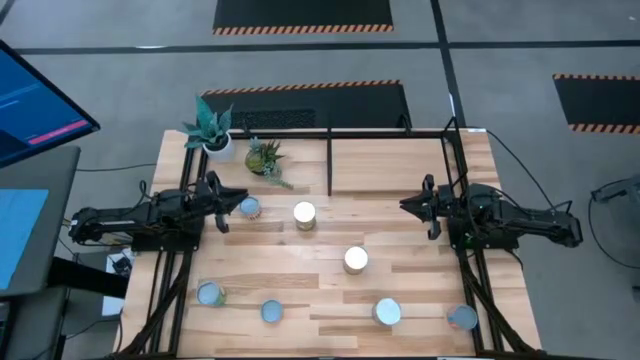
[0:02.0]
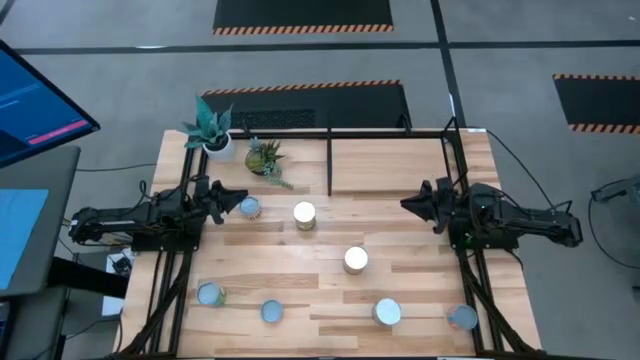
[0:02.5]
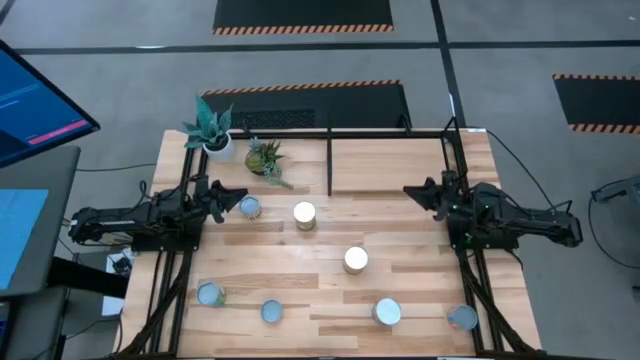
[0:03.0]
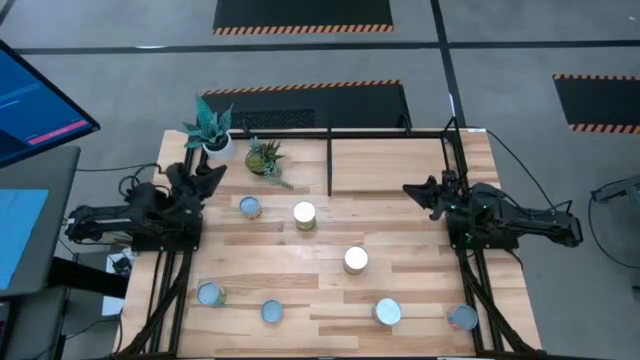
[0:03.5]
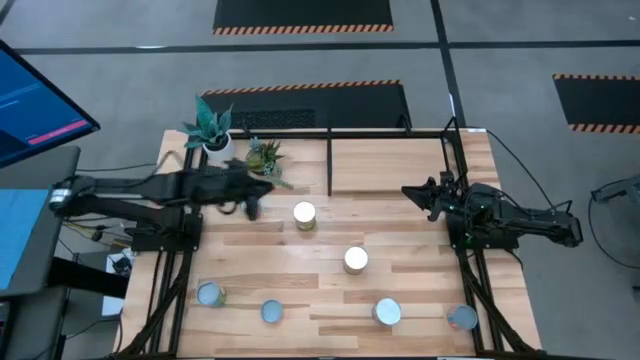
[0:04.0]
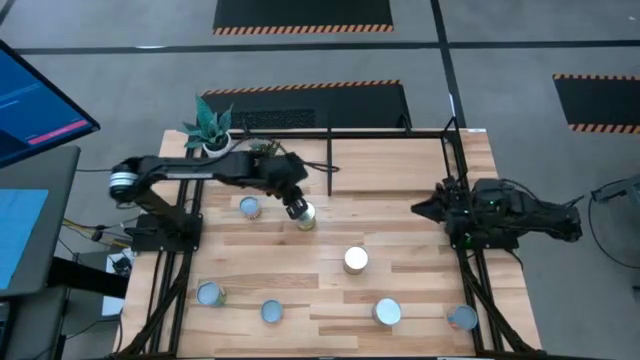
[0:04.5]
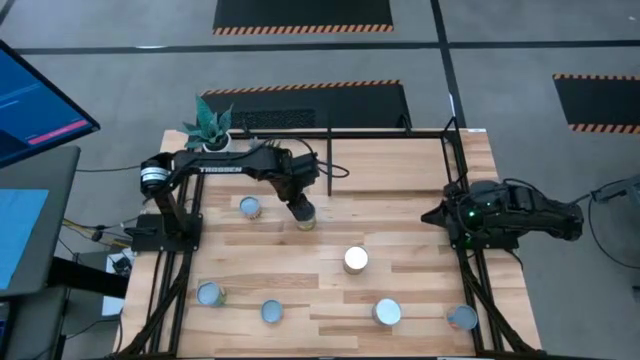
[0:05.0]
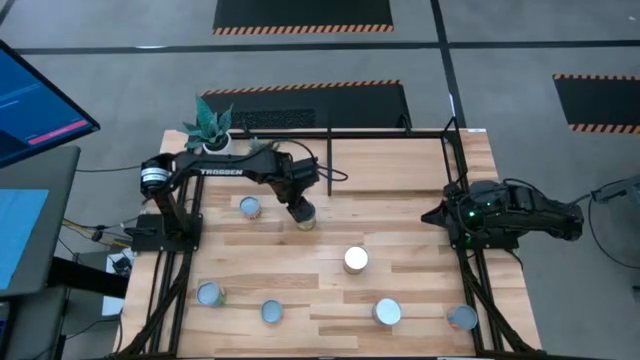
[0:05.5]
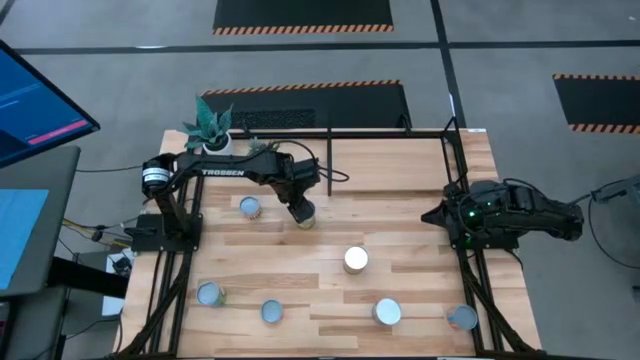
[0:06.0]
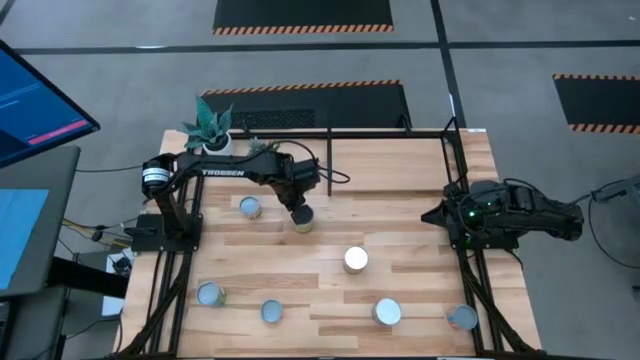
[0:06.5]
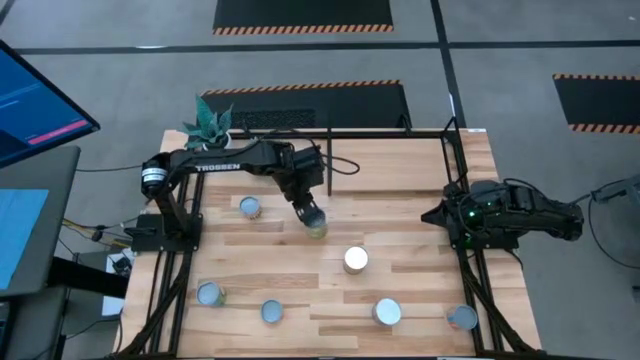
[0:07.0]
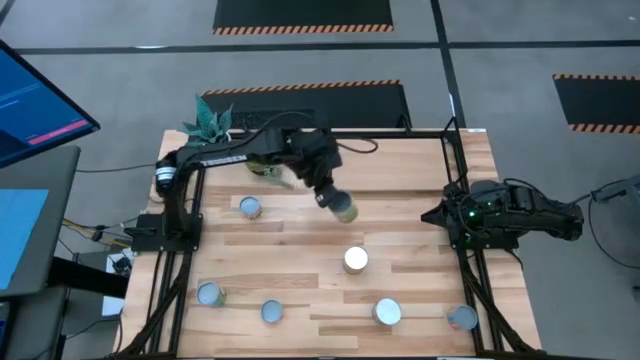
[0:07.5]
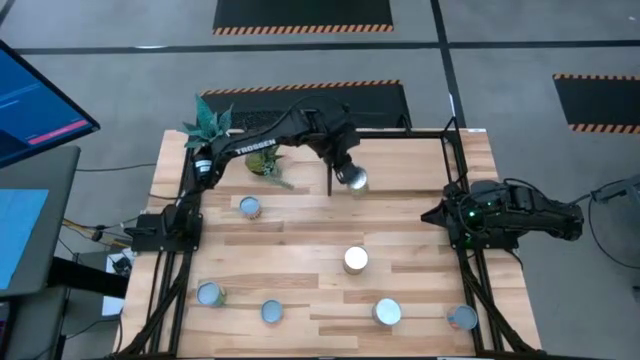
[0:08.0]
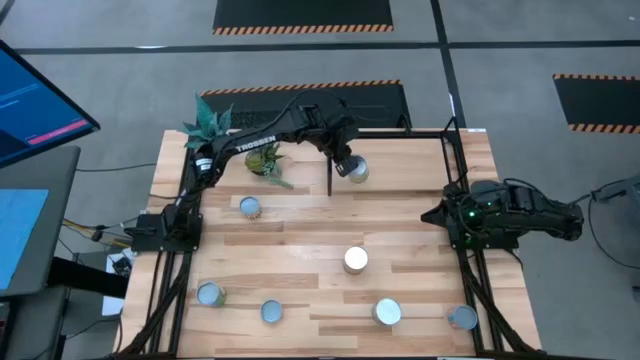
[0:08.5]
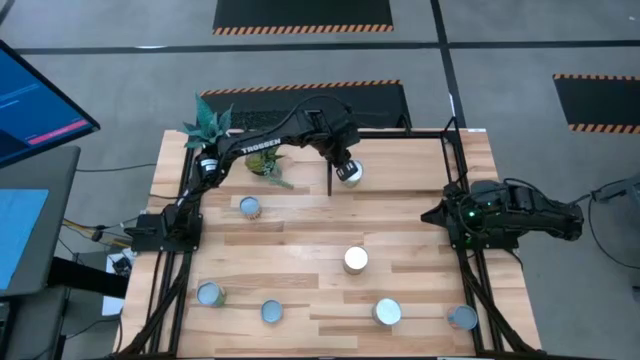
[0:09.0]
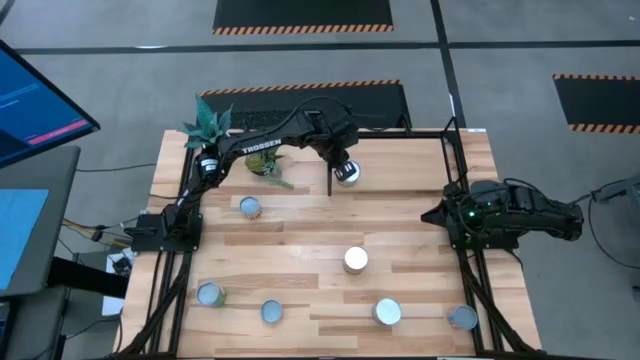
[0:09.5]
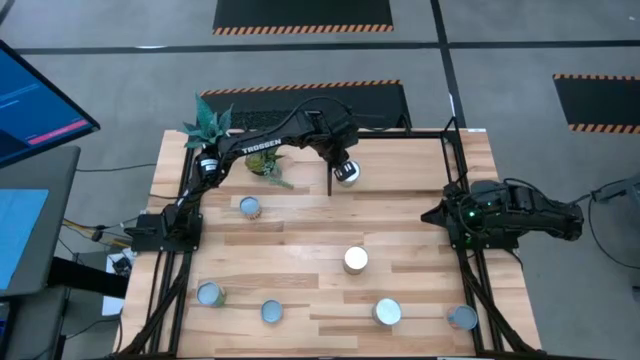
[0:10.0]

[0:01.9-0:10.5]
Task: Pick and place cans onto a shelf
Put the canned pears on the shelf

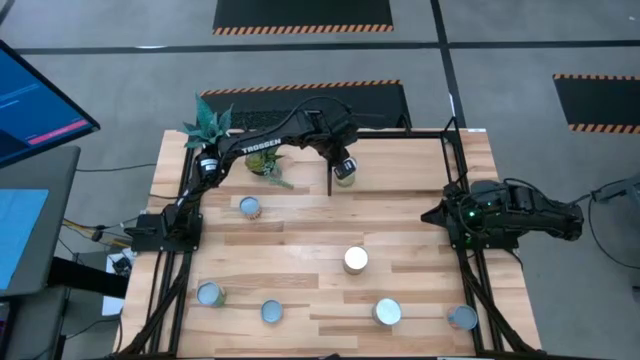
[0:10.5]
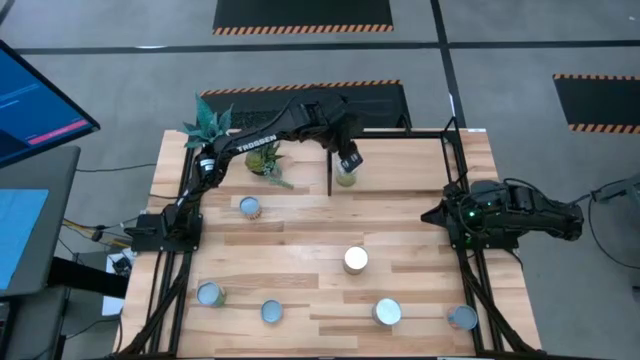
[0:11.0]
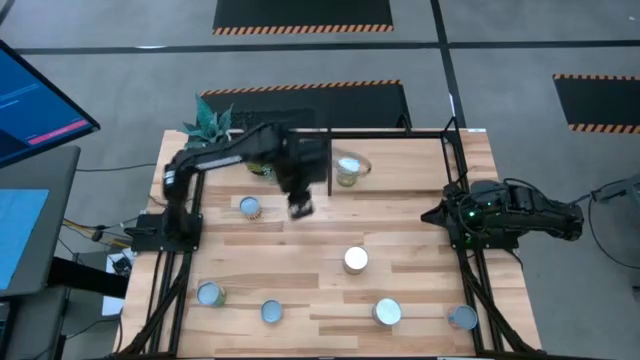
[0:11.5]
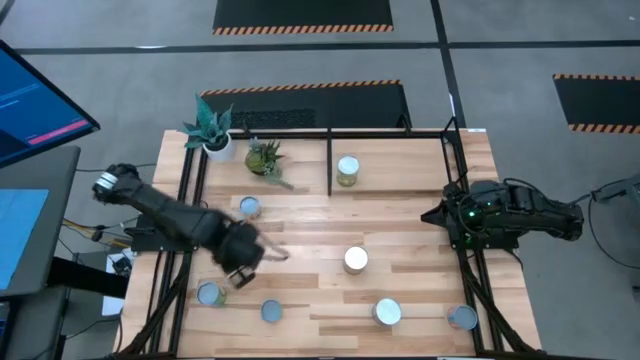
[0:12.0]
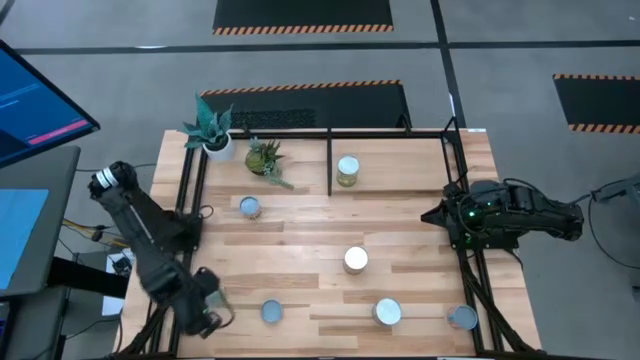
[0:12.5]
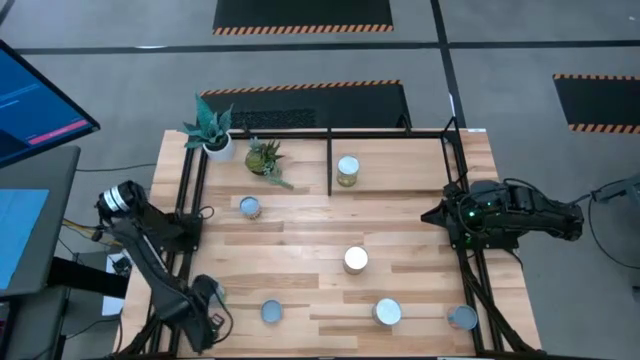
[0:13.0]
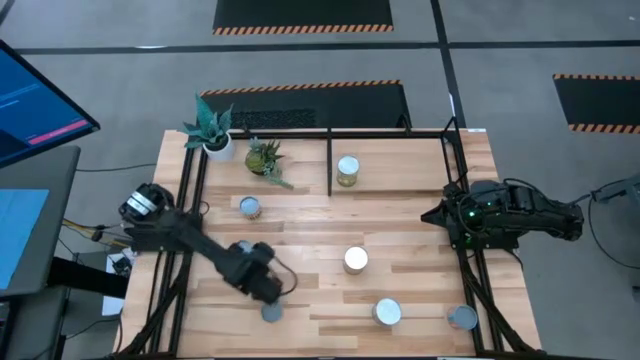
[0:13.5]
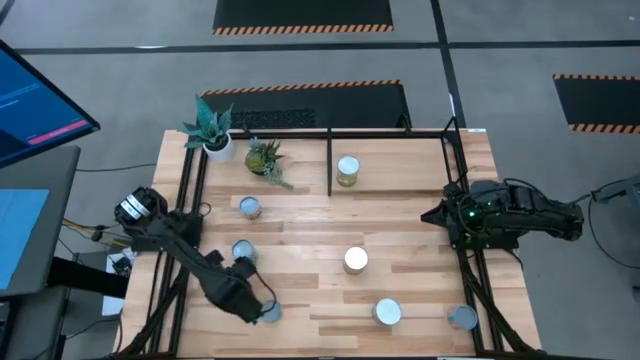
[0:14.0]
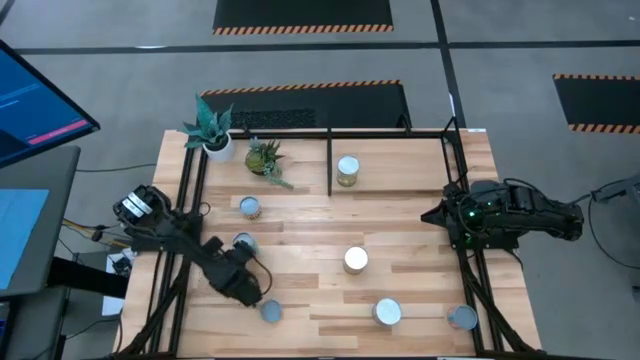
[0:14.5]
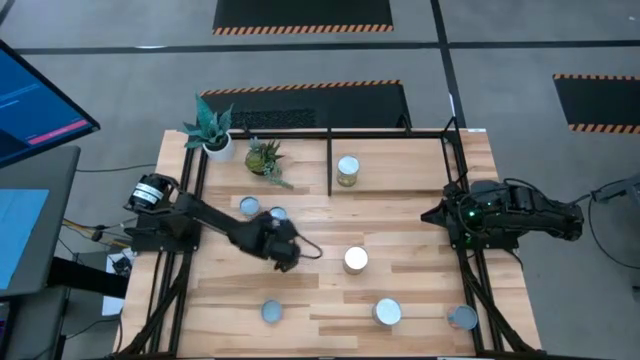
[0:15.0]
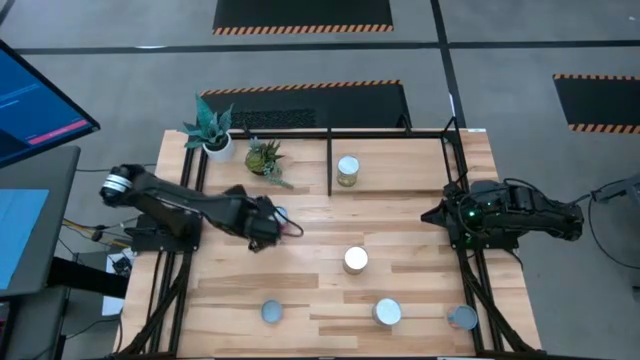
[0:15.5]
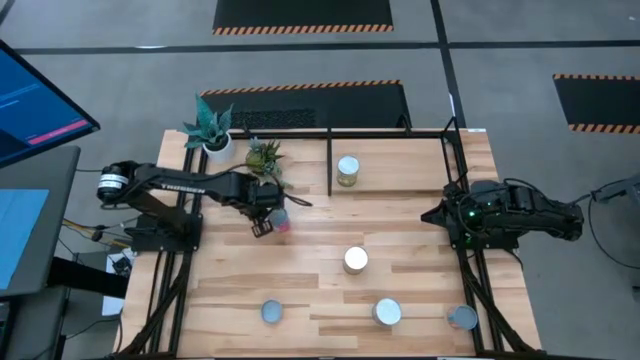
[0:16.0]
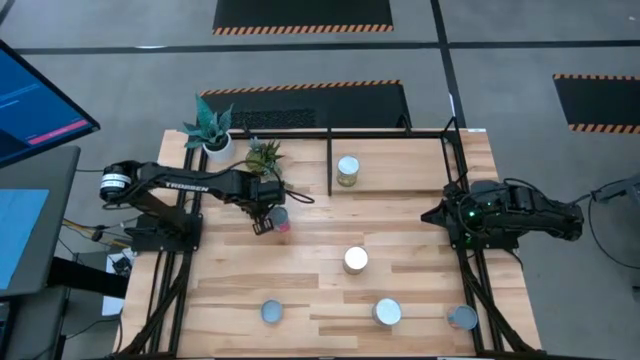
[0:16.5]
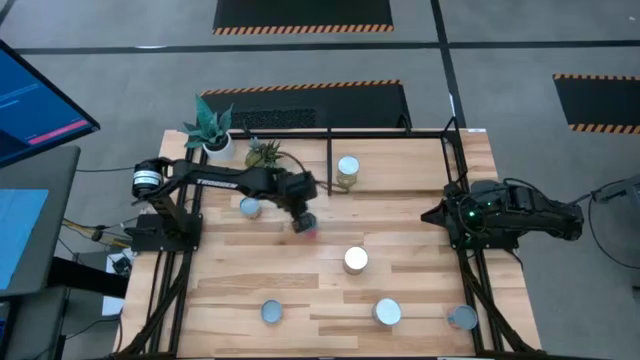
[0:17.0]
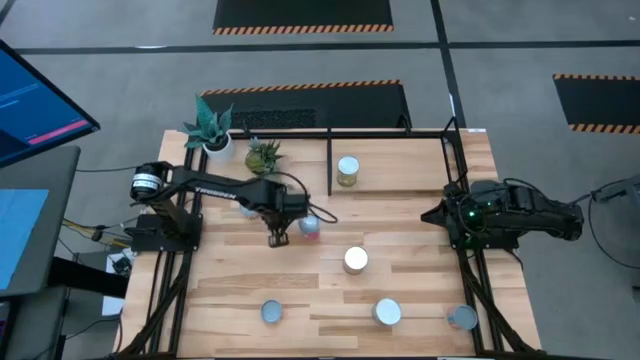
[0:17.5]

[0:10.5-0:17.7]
Put the canned chicken soup on the shelf

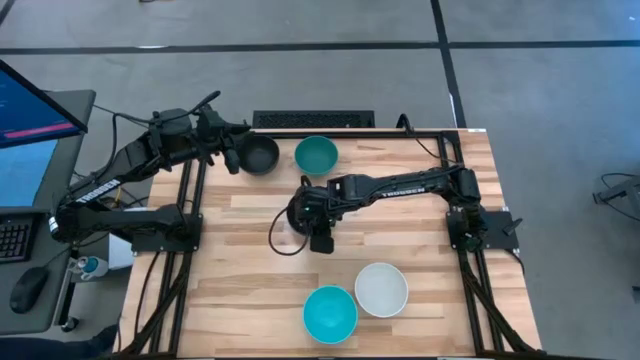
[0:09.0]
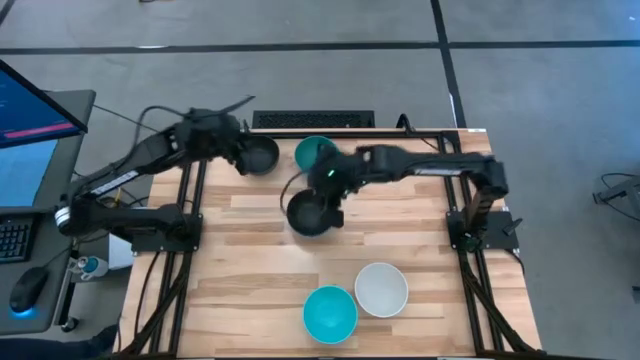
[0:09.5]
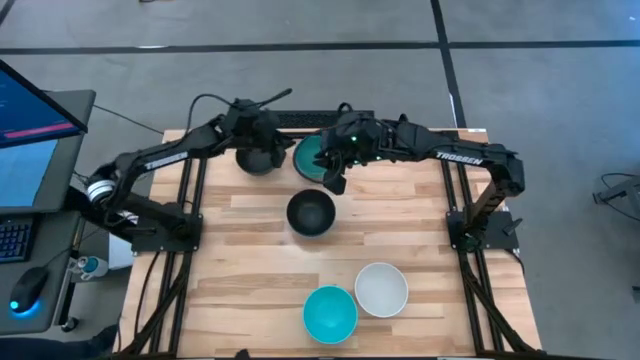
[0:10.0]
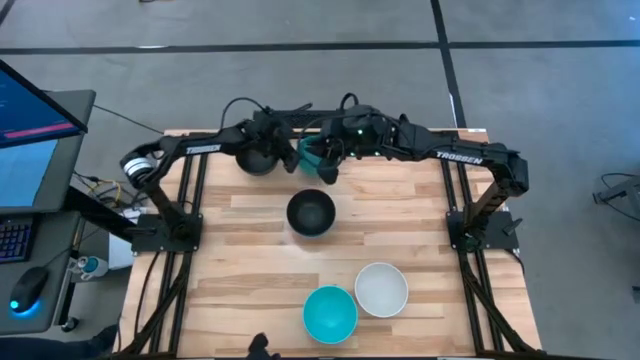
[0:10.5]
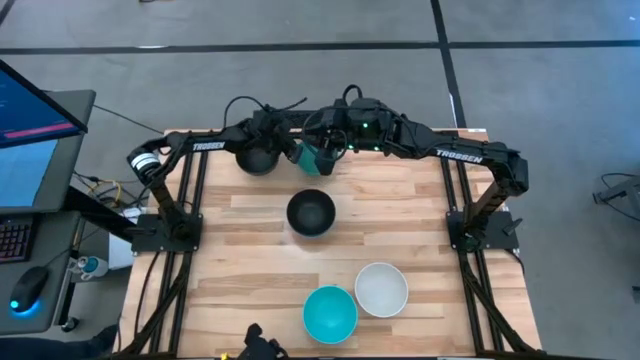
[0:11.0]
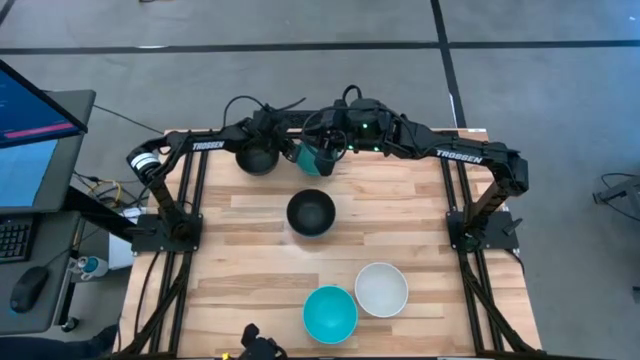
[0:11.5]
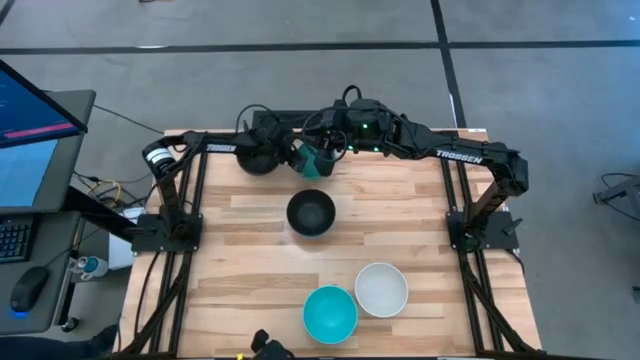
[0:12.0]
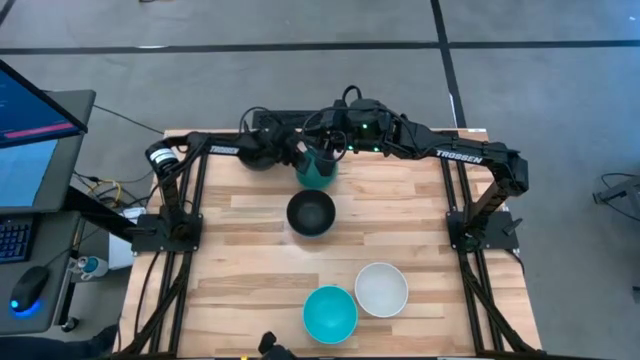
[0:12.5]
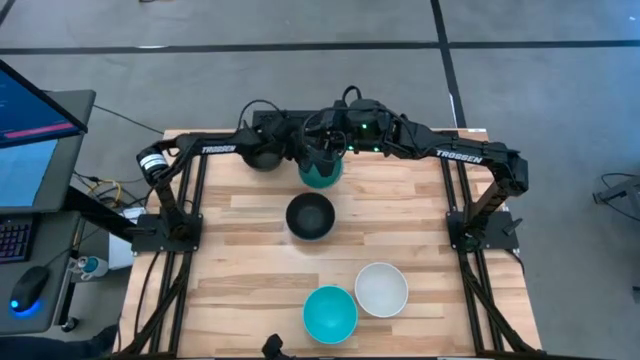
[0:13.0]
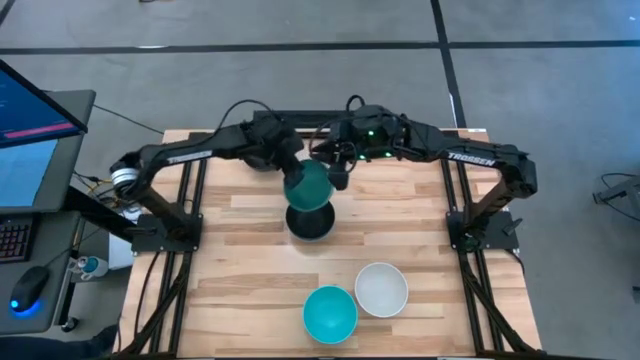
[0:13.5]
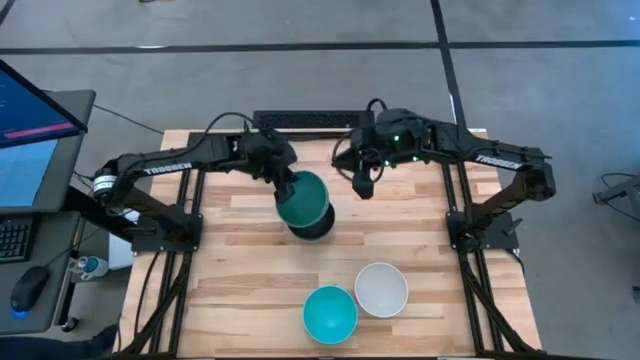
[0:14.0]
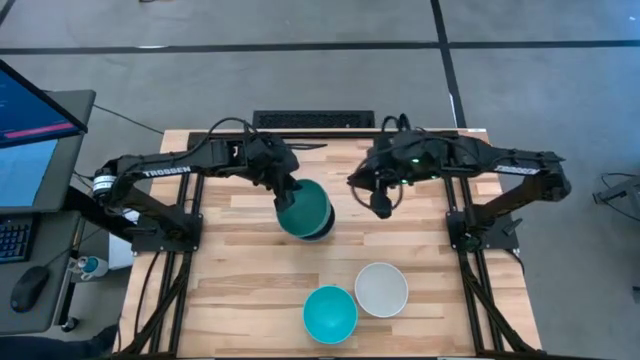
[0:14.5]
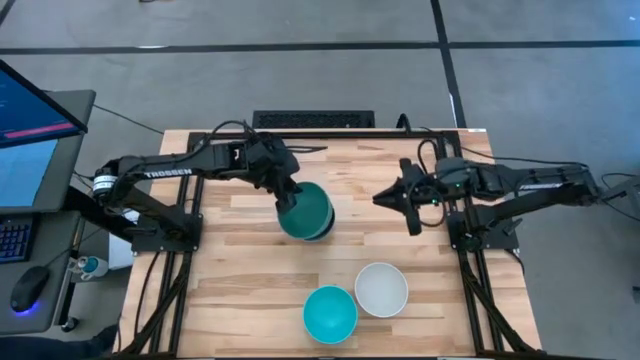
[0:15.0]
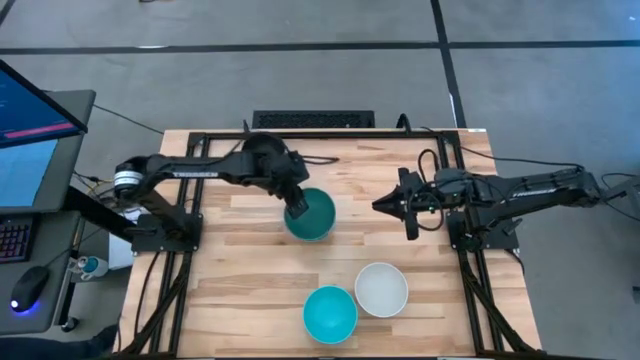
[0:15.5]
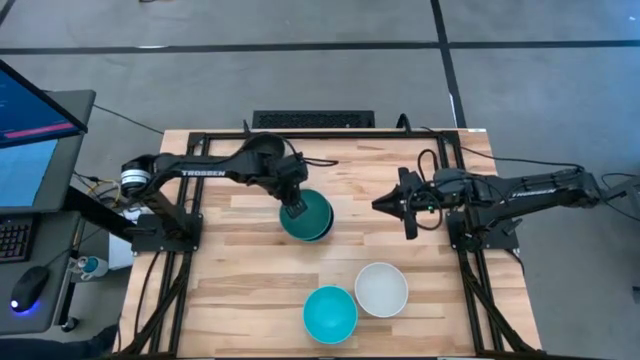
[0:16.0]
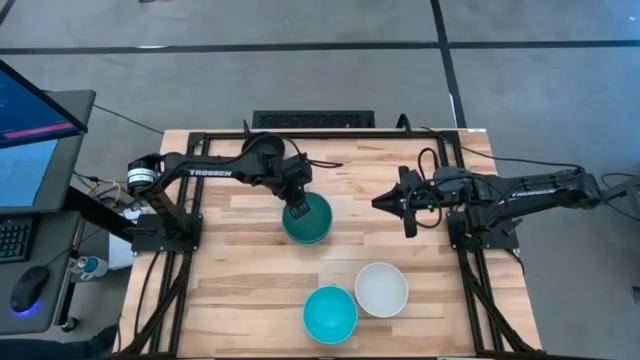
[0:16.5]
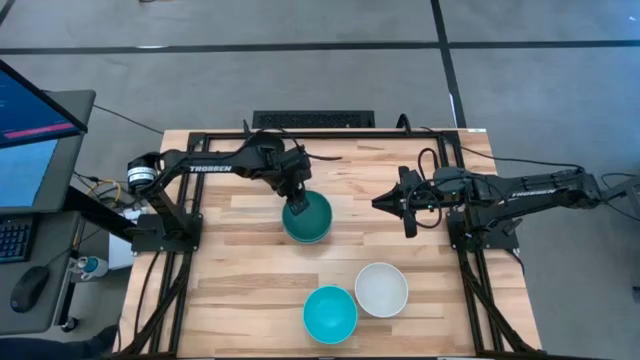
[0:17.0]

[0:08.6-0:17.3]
Task: Nest bowls inside each other
Stack the green bowl on the bottom black bowl
